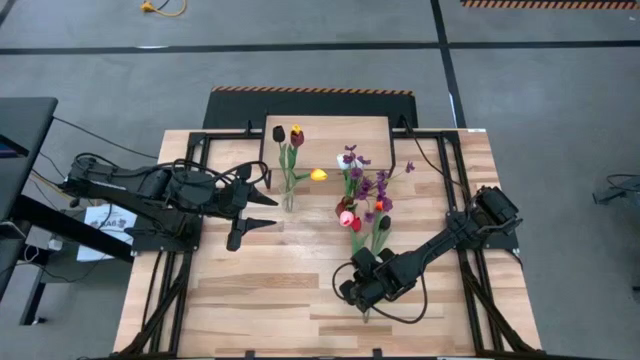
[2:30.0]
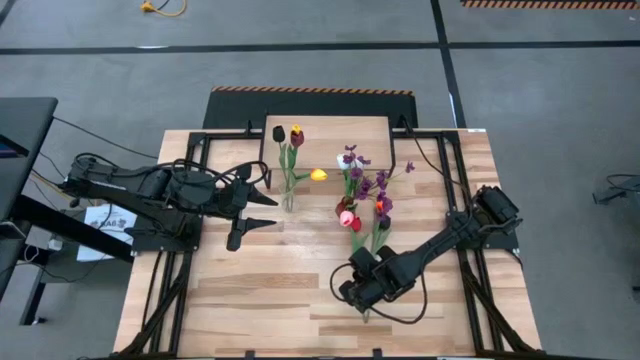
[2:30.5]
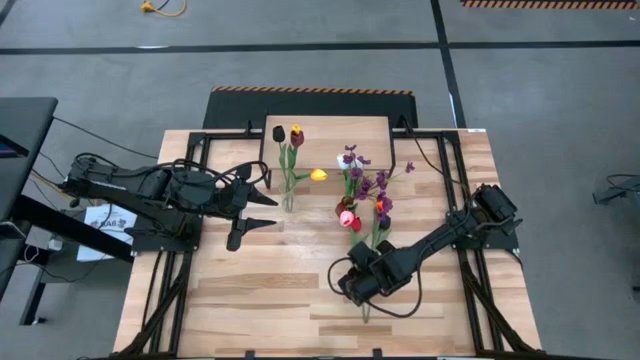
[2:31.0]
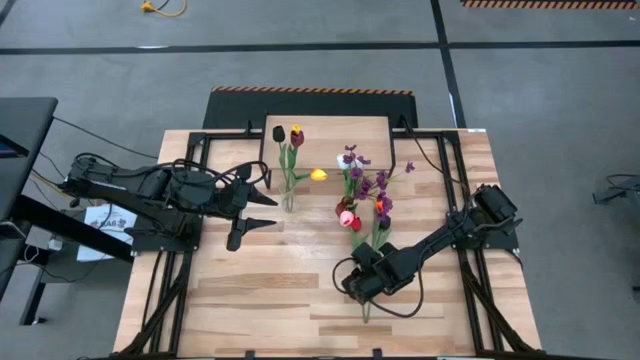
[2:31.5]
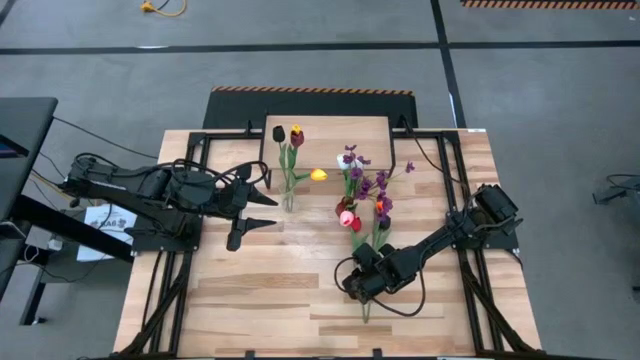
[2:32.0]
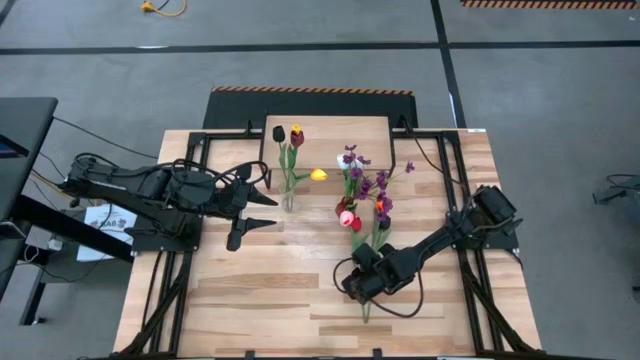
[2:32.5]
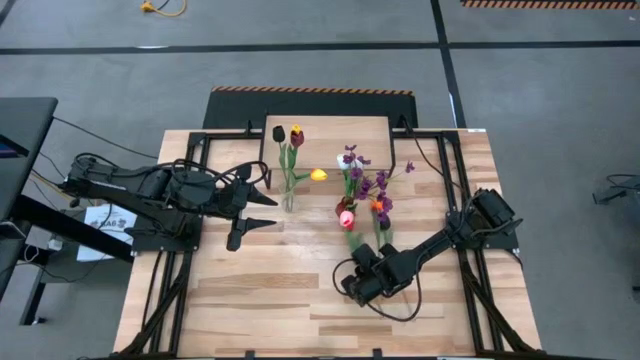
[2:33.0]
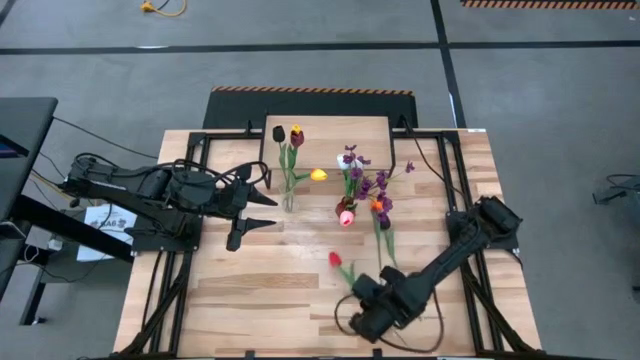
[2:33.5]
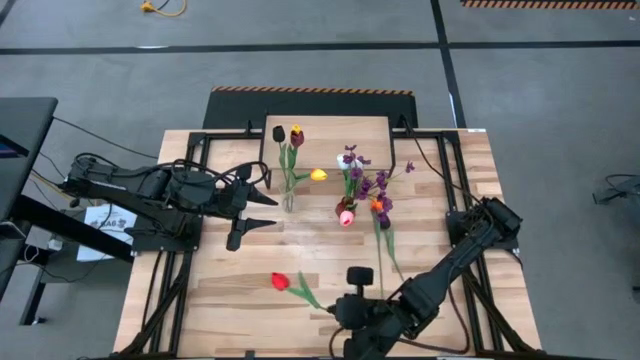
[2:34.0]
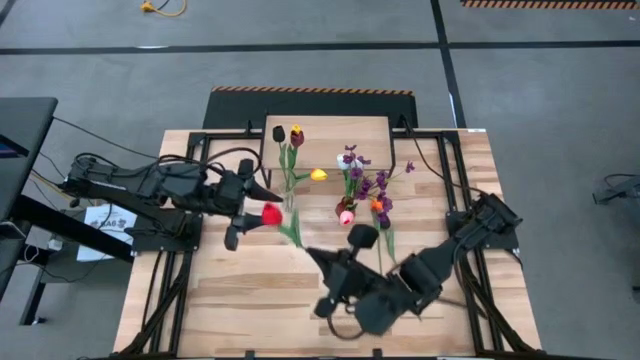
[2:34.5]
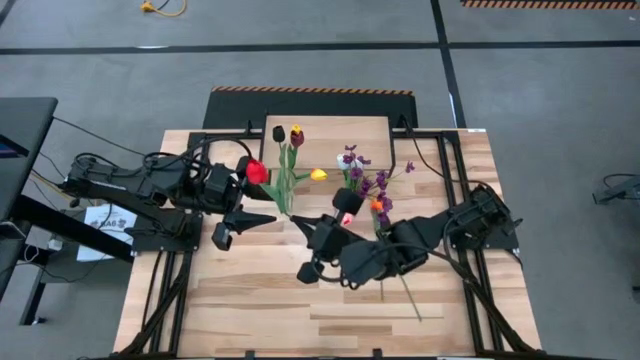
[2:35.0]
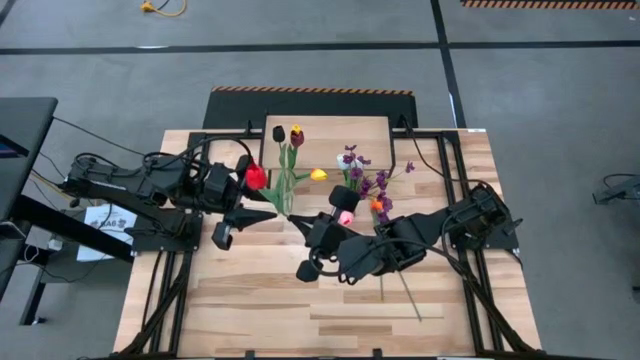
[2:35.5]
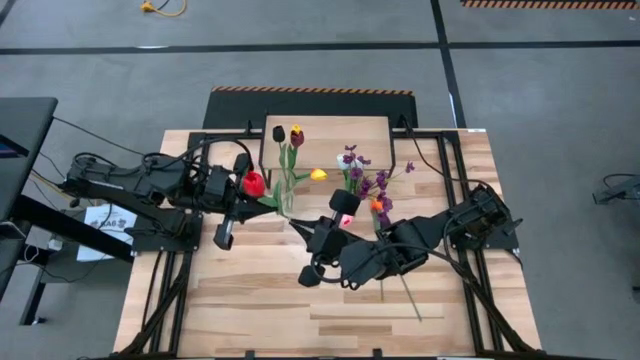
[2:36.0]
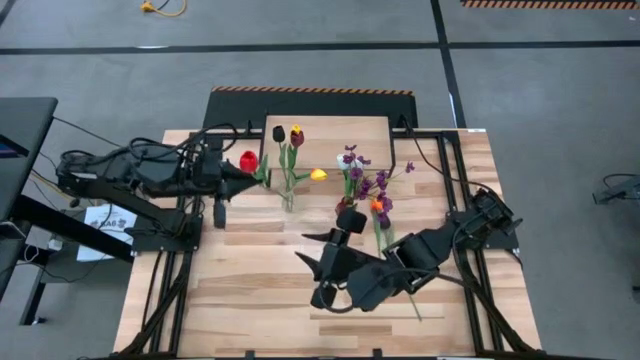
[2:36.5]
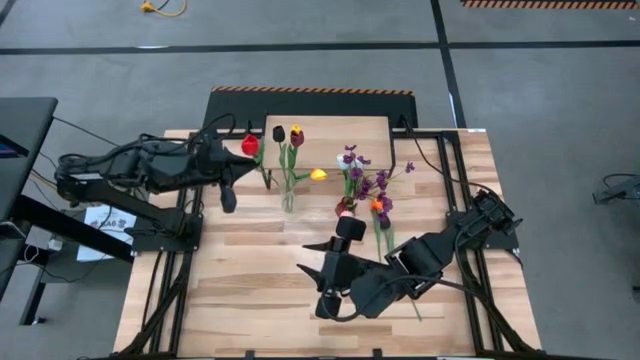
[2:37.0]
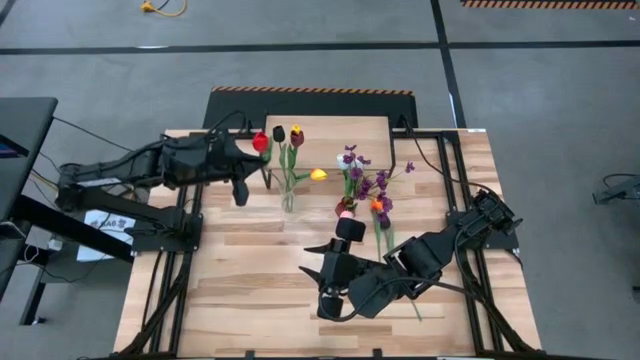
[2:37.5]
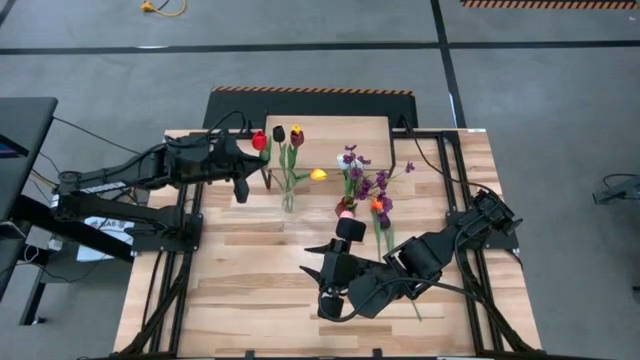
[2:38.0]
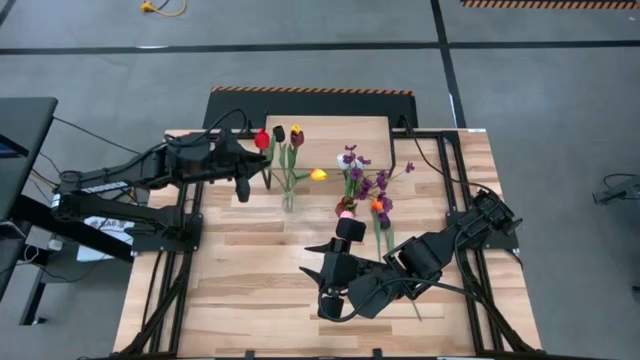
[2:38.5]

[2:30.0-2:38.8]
Task: Pick and place flowers into a vace then onto a shelf
Put the red flower into the transparent vase

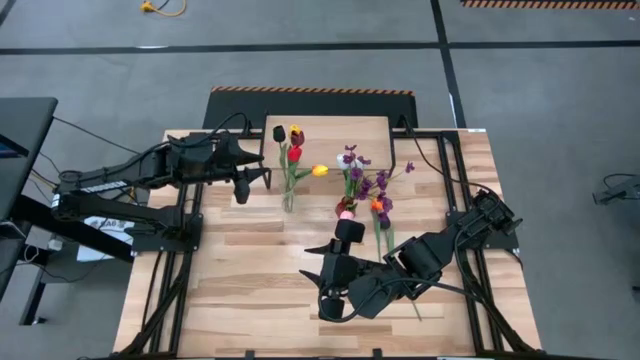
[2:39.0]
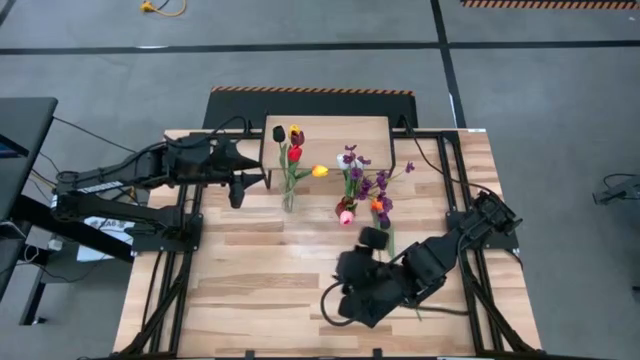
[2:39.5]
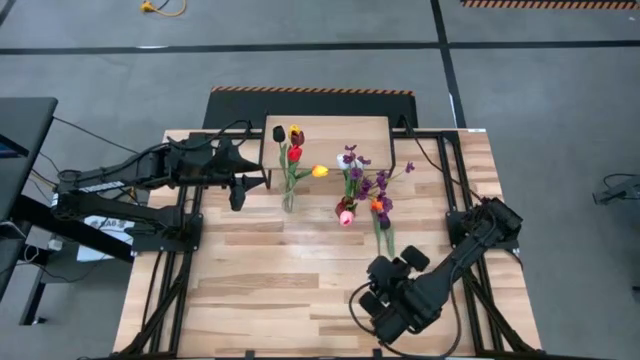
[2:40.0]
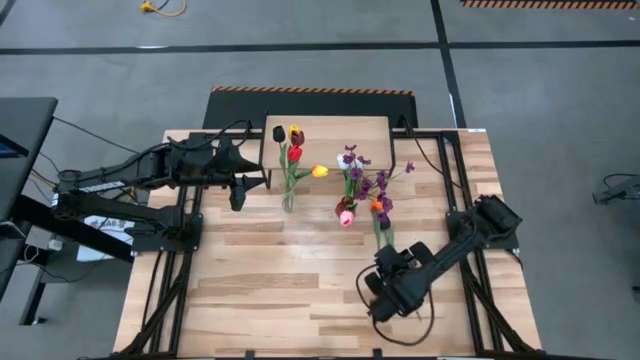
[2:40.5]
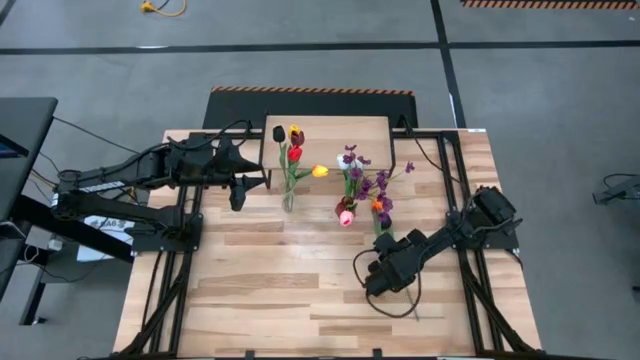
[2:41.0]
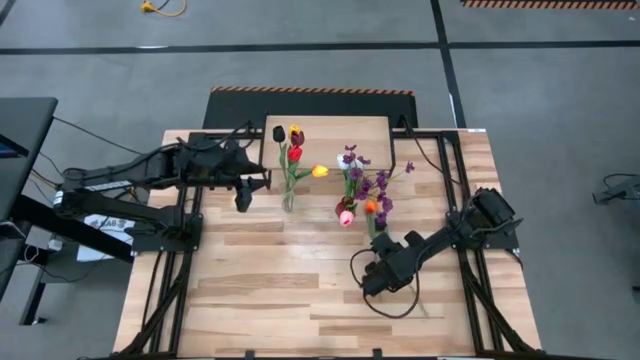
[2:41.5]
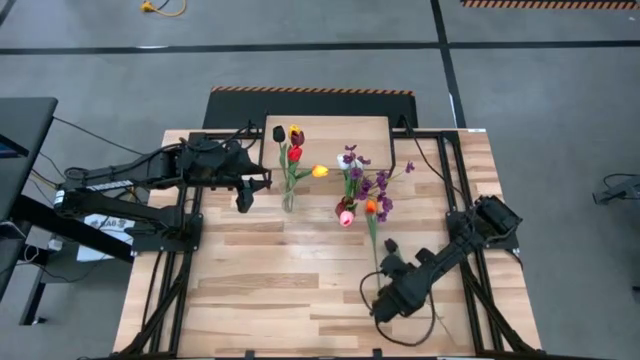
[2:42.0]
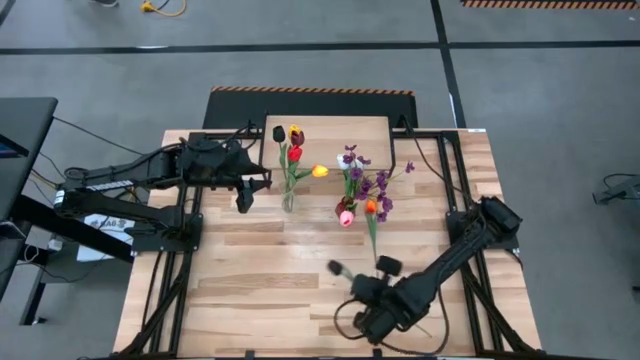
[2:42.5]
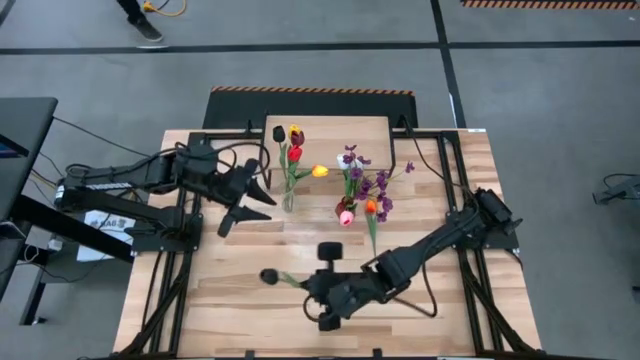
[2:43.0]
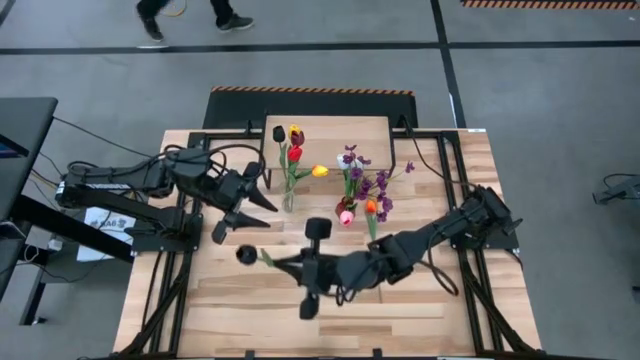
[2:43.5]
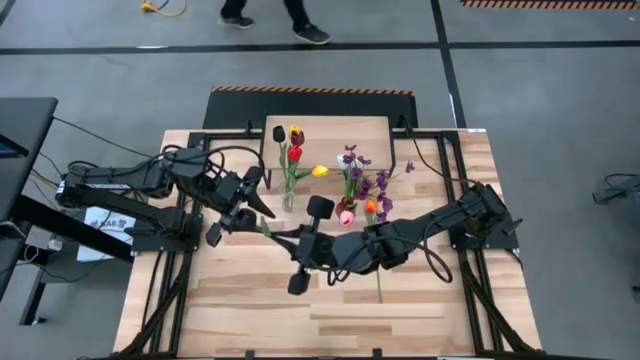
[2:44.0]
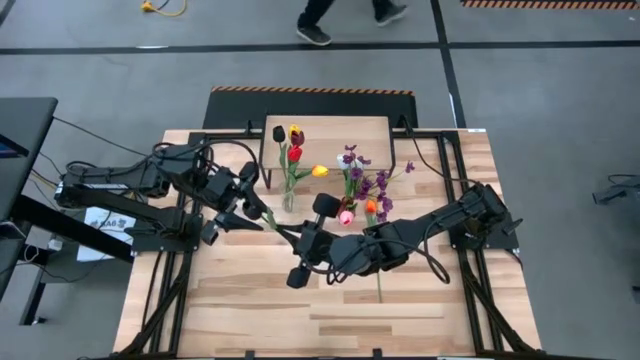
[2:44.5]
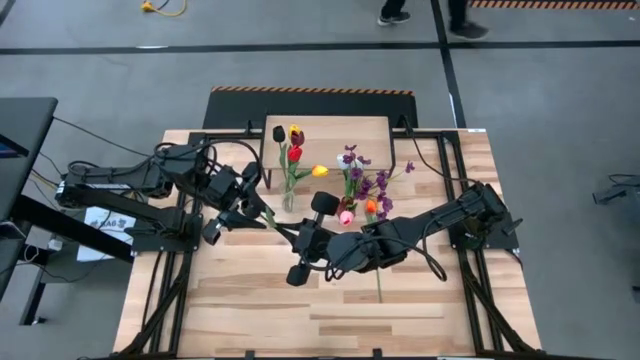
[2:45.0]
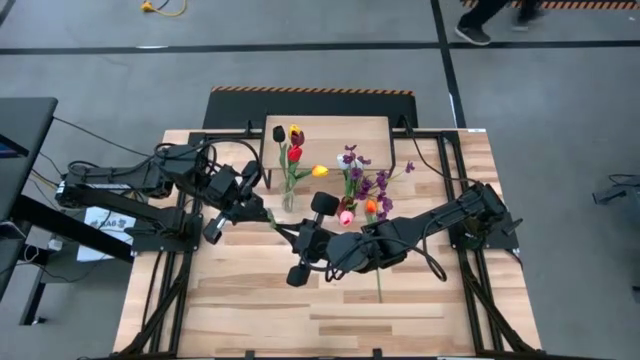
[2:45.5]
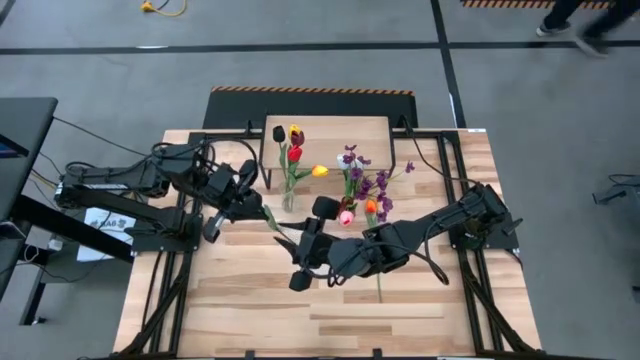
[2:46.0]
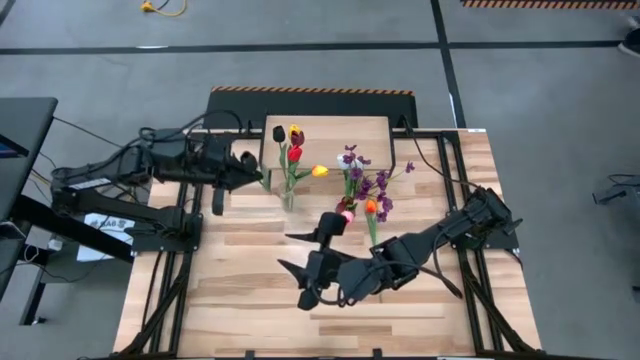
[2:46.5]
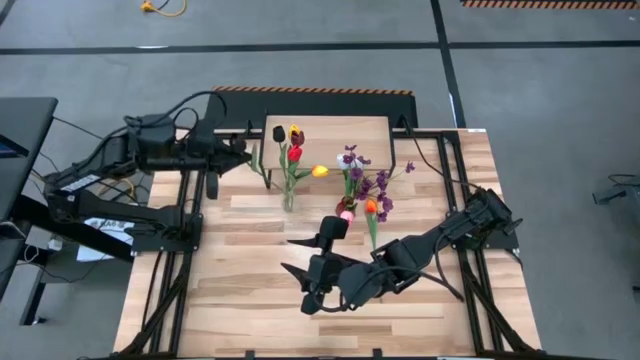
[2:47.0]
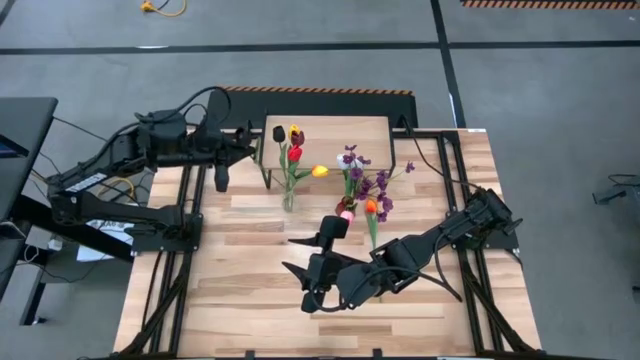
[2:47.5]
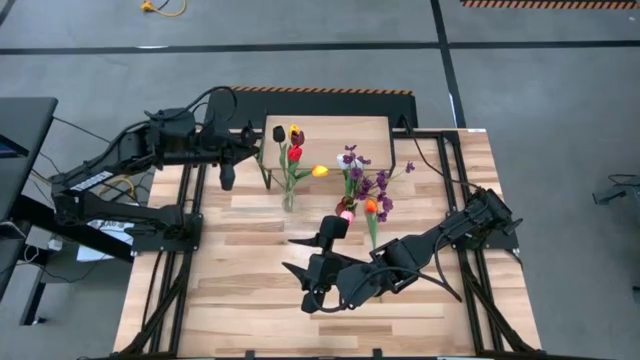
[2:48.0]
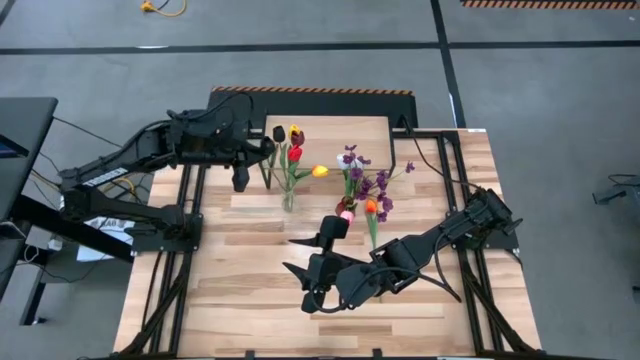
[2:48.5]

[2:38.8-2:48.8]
Put the black flower into the transparent vase

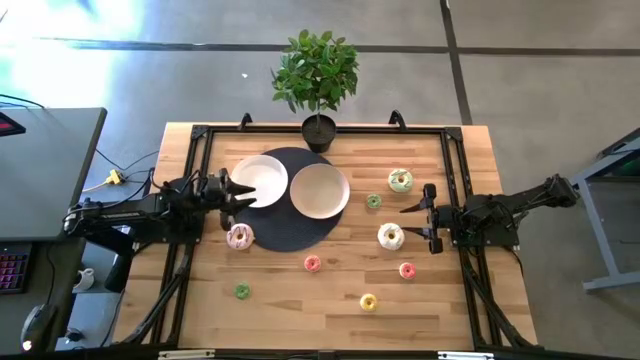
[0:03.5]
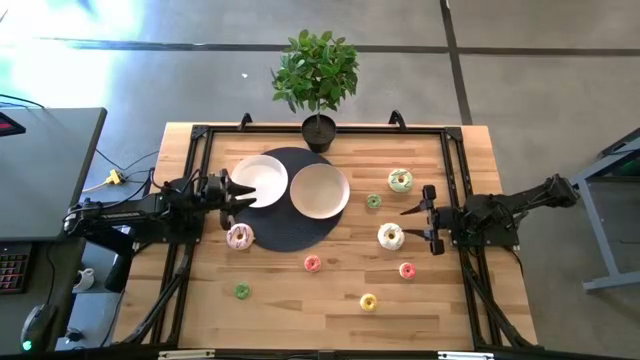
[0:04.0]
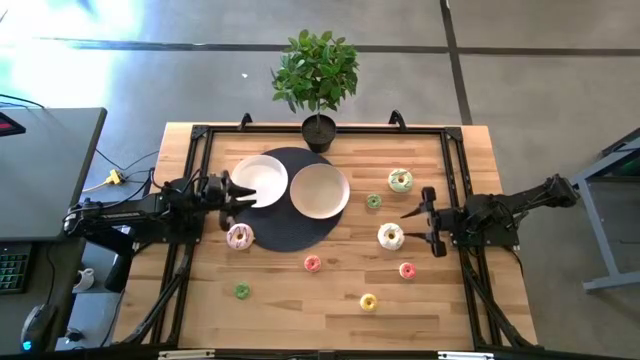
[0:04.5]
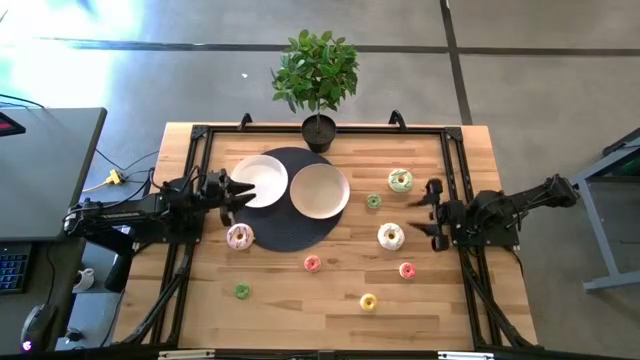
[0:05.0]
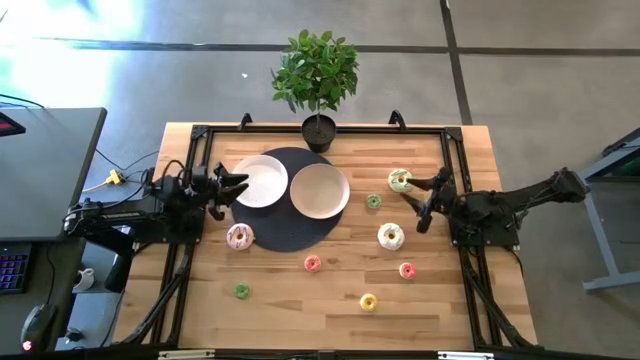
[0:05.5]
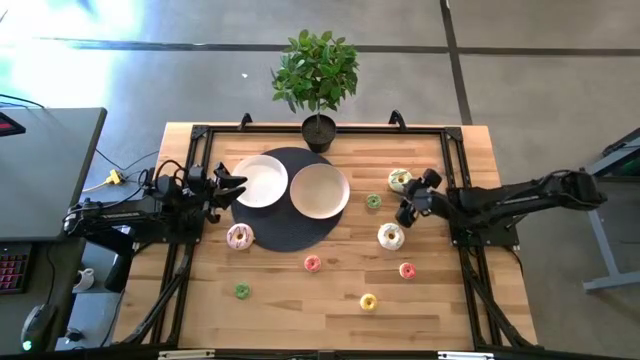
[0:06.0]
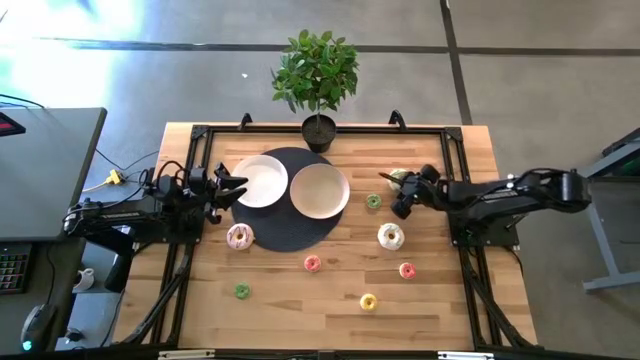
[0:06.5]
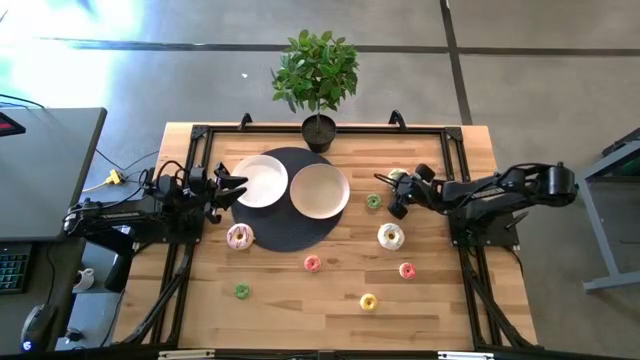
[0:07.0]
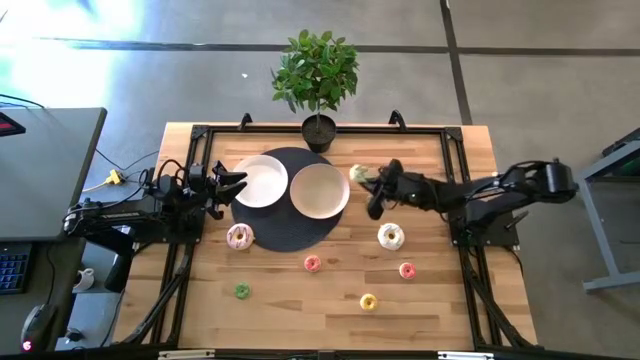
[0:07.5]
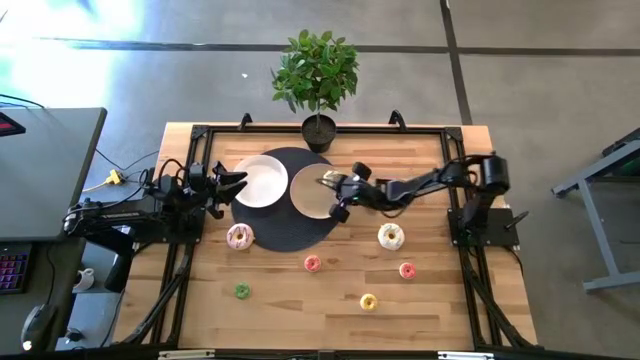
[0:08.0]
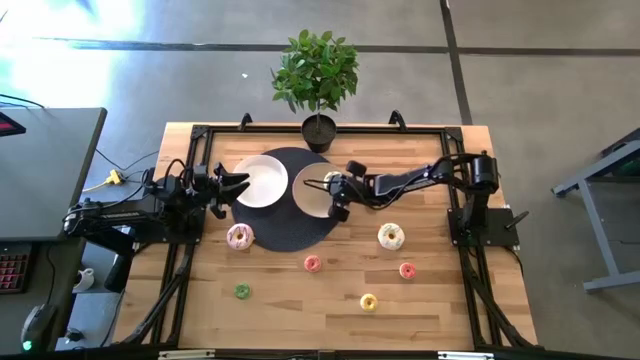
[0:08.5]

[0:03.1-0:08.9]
Task: Pick & Place donuts
Put the large blue donut onto the brown plate
